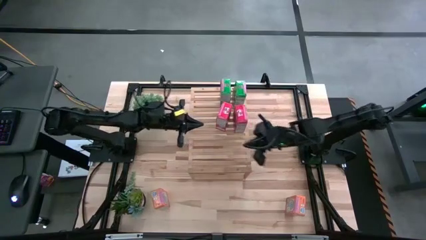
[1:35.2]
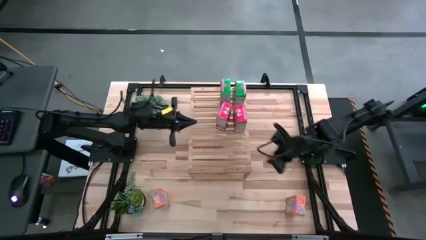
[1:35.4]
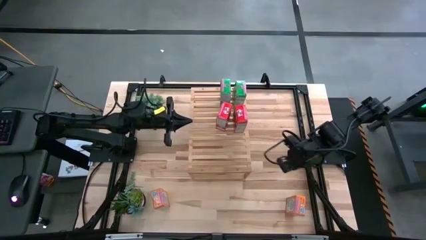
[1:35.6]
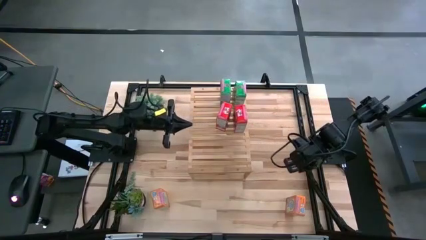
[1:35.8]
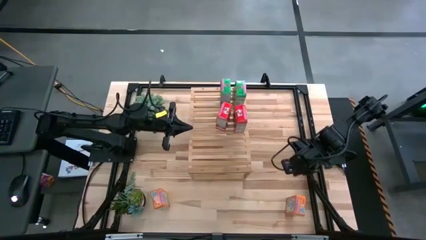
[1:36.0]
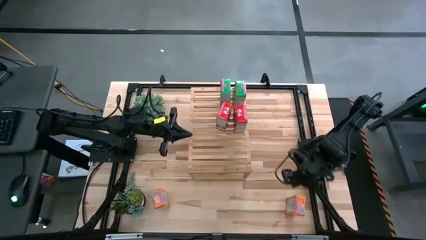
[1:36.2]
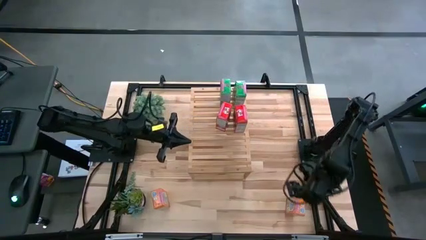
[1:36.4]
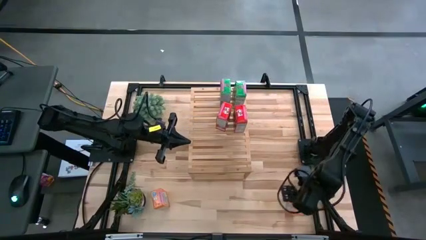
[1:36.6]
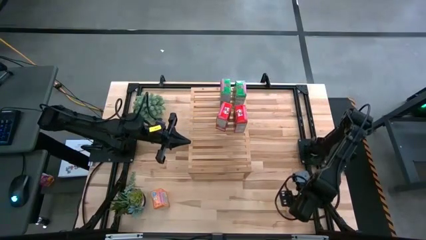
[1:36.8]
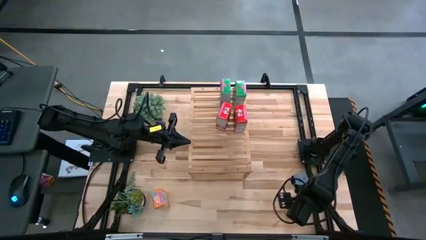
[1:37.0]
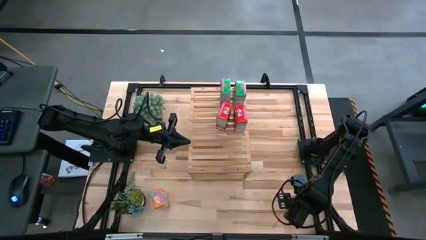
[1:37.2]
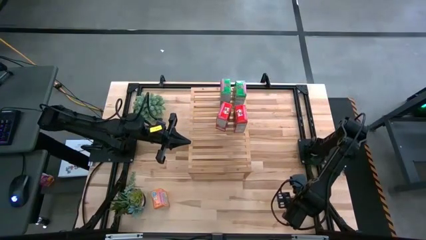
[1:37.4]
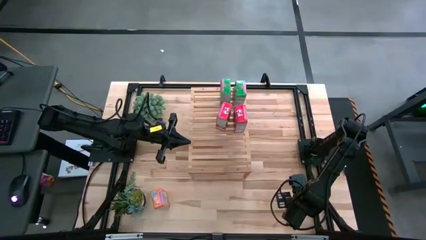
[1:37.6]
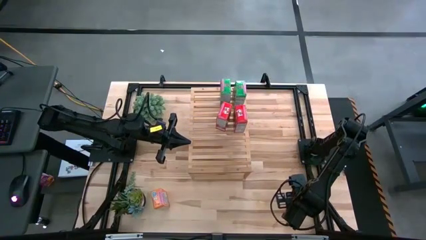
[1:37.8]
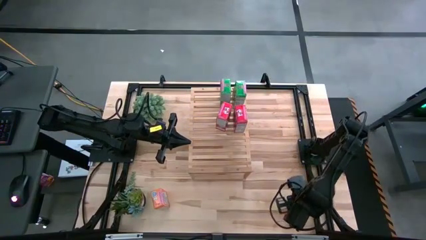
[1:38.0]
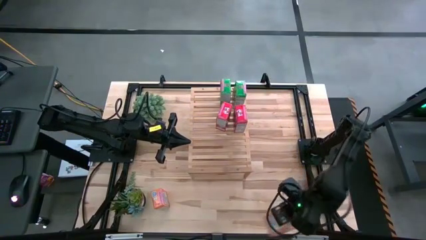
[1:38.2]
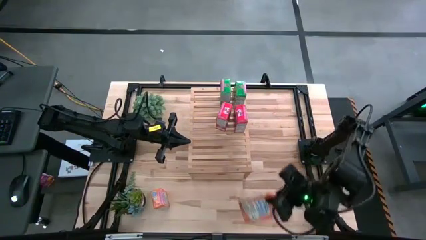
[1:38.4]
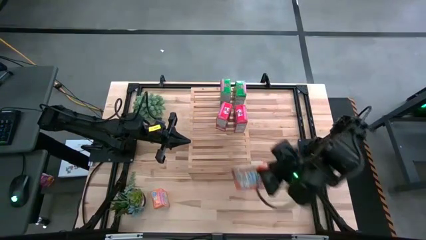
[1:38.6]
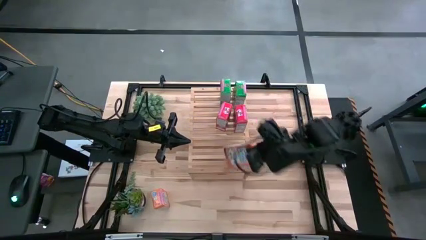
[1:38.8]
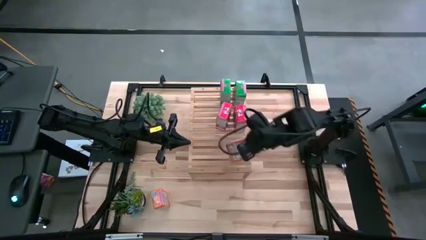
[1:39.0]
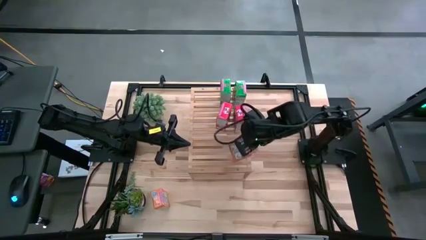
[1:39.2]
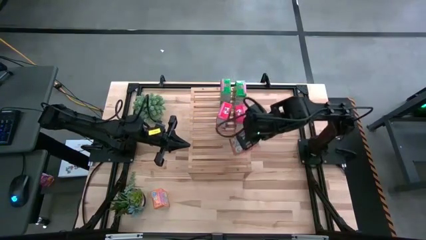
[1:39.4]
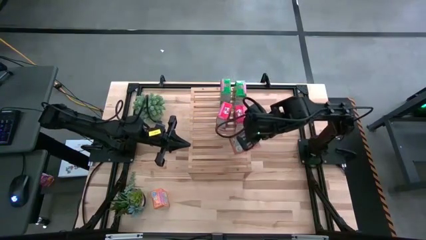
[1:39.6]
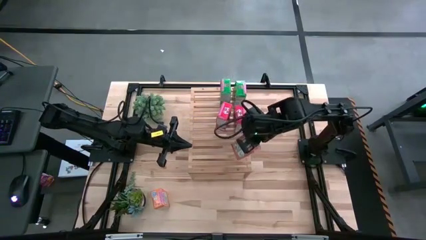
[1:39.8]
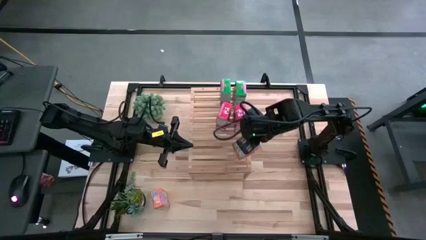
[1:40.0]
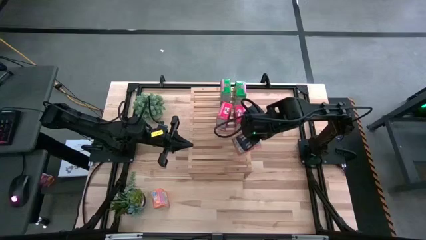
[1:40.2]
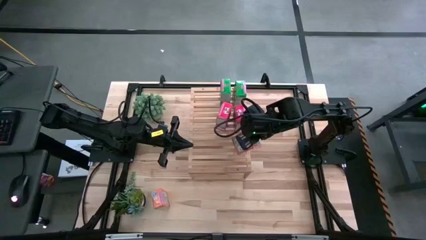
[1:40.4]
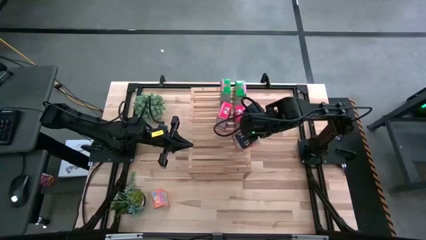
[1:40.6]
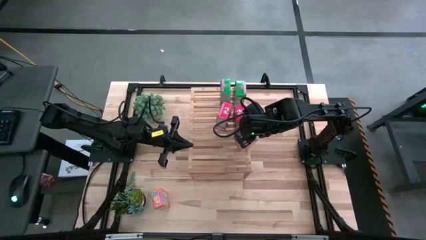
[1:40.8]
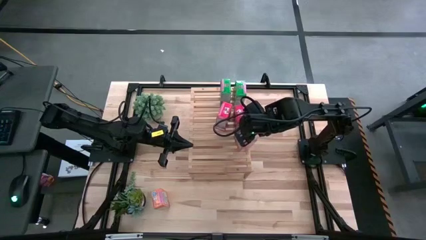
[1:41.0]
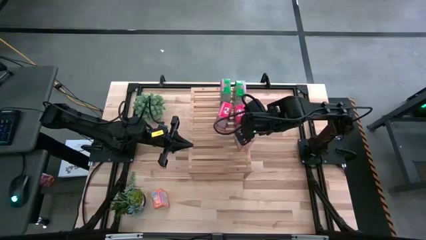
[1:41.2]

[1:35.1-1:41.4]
Task: Stack cereal on shelf
Put the right orange cereal box on the shelf

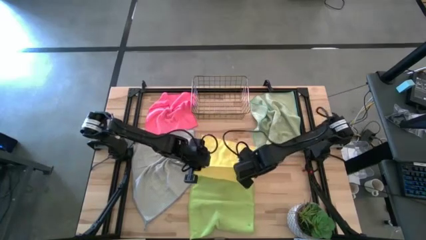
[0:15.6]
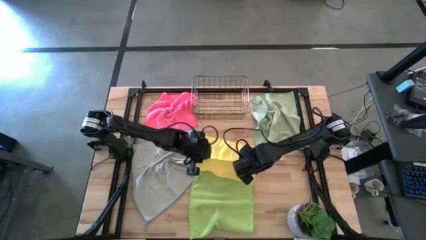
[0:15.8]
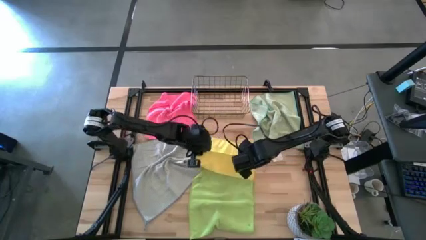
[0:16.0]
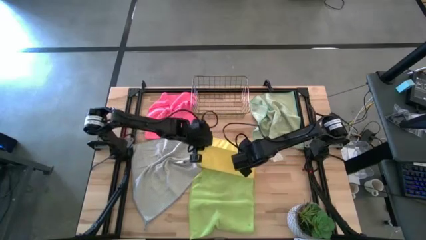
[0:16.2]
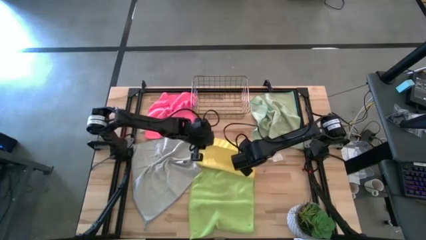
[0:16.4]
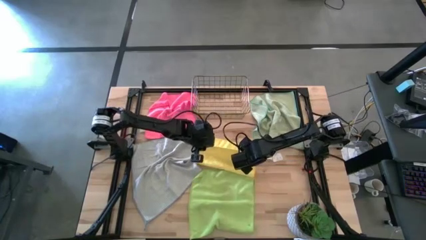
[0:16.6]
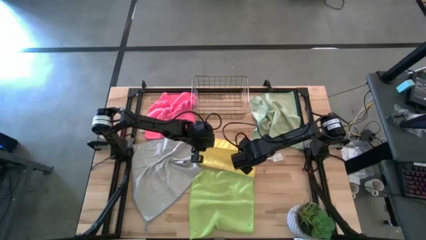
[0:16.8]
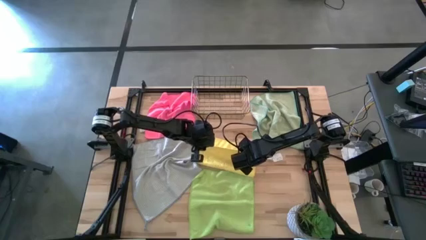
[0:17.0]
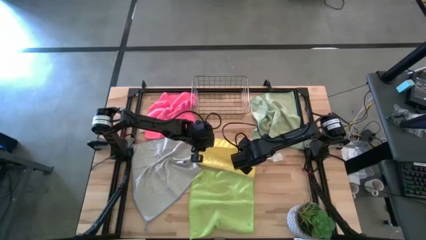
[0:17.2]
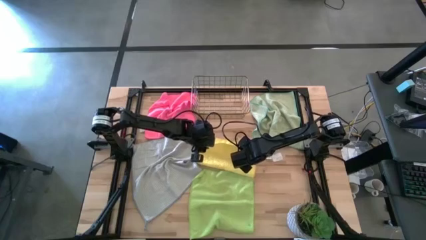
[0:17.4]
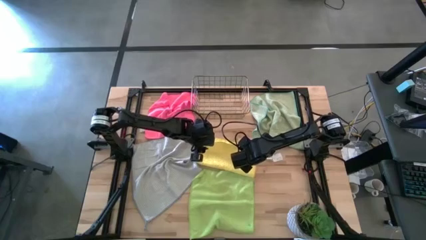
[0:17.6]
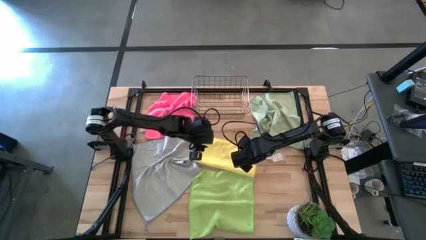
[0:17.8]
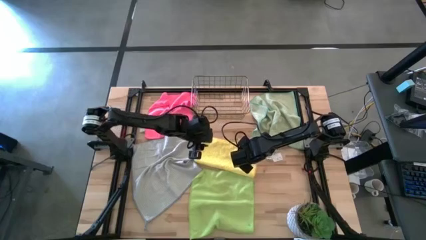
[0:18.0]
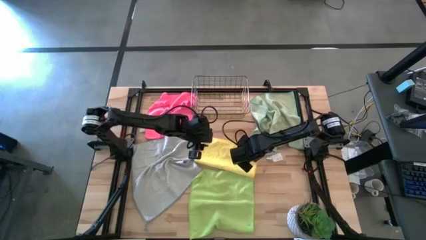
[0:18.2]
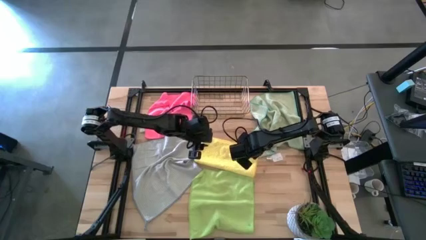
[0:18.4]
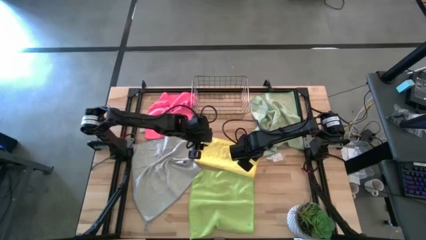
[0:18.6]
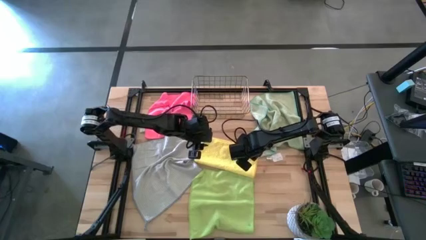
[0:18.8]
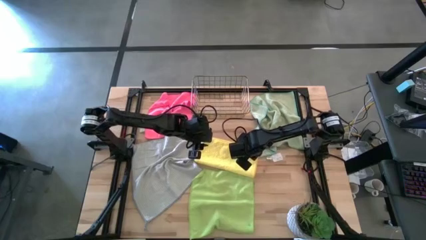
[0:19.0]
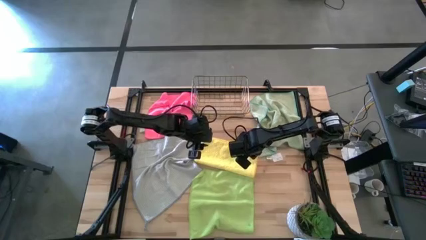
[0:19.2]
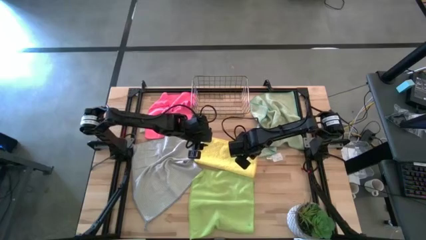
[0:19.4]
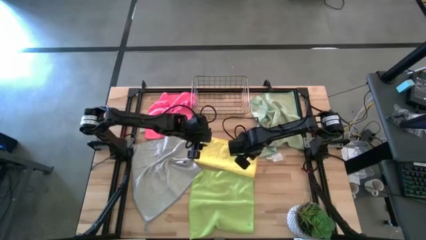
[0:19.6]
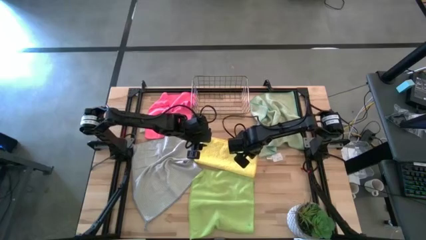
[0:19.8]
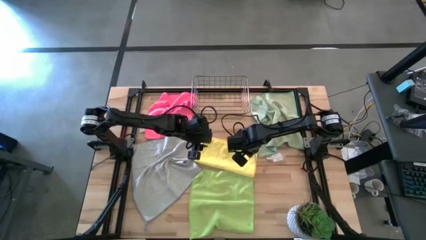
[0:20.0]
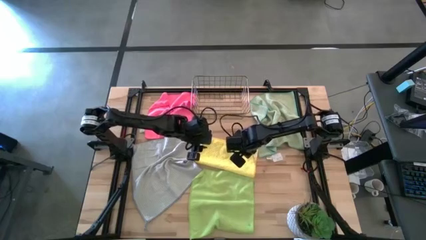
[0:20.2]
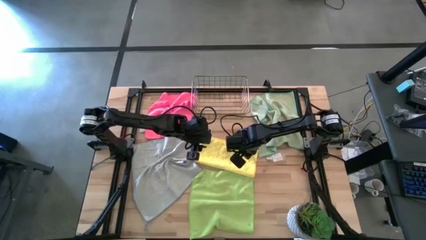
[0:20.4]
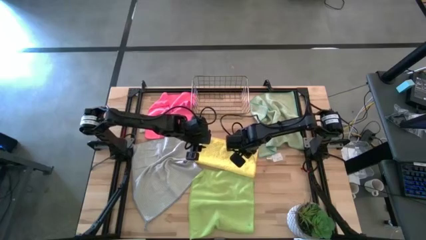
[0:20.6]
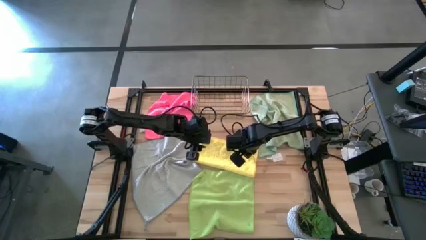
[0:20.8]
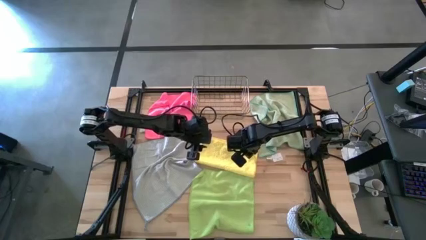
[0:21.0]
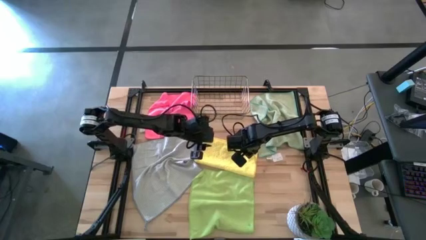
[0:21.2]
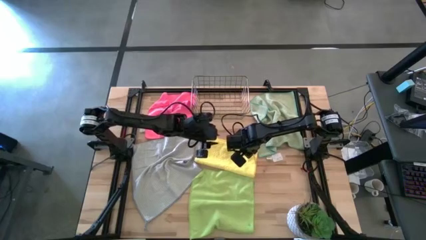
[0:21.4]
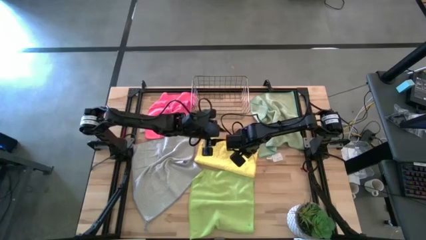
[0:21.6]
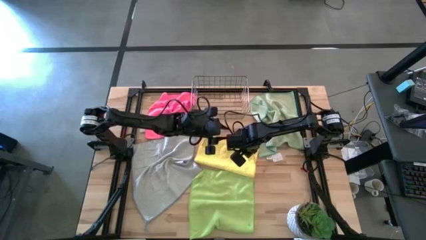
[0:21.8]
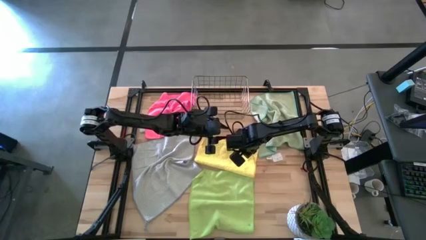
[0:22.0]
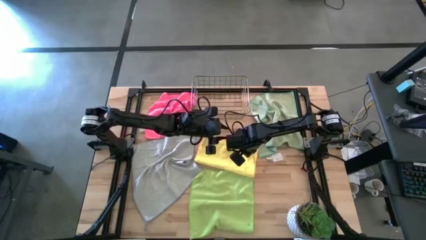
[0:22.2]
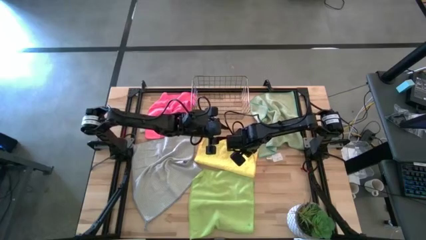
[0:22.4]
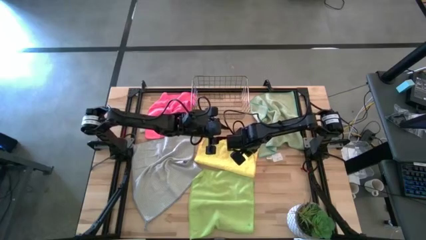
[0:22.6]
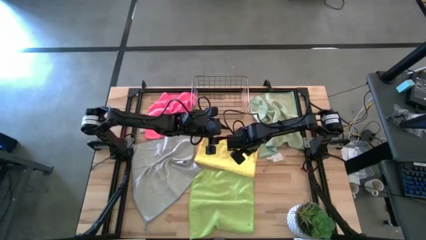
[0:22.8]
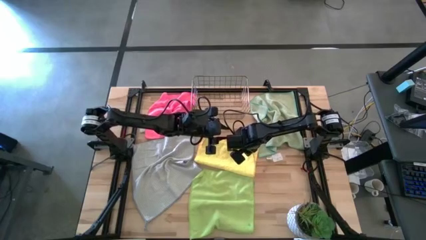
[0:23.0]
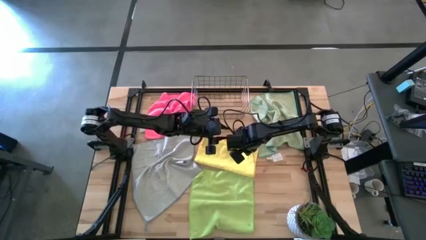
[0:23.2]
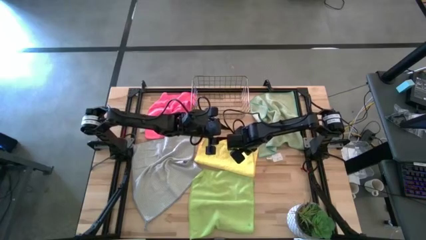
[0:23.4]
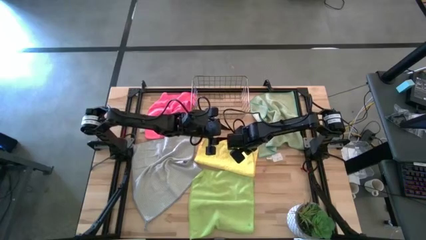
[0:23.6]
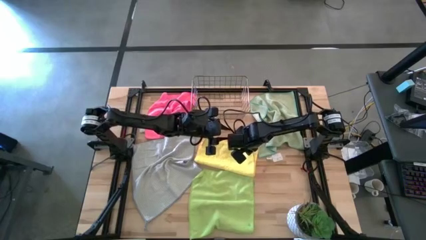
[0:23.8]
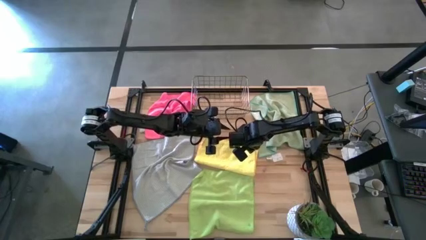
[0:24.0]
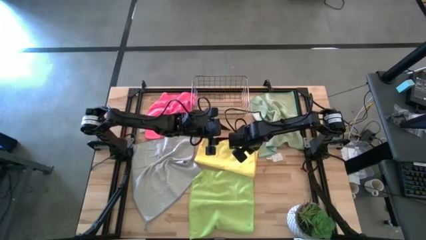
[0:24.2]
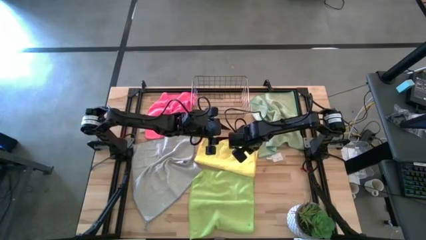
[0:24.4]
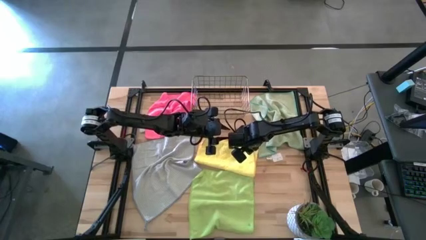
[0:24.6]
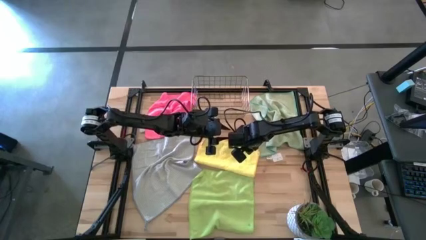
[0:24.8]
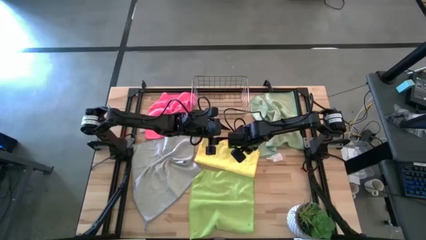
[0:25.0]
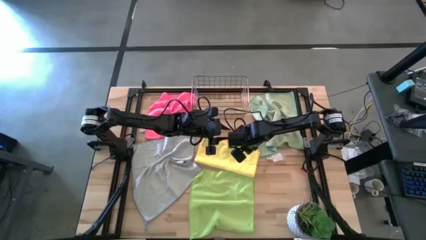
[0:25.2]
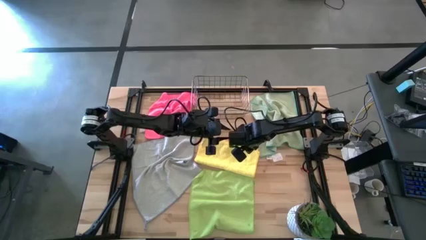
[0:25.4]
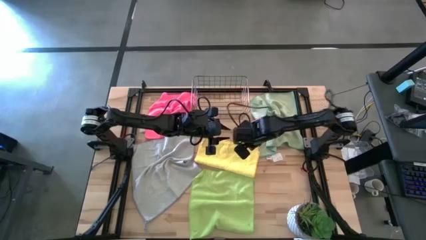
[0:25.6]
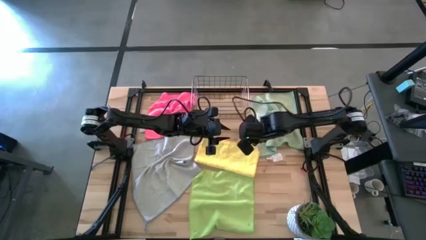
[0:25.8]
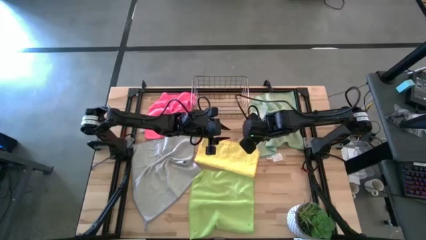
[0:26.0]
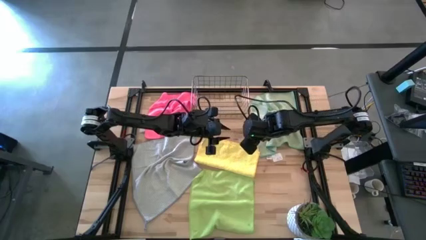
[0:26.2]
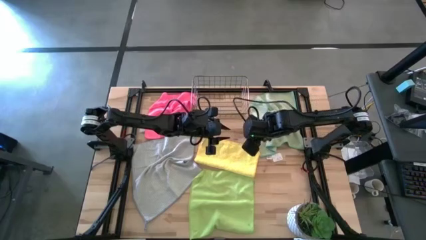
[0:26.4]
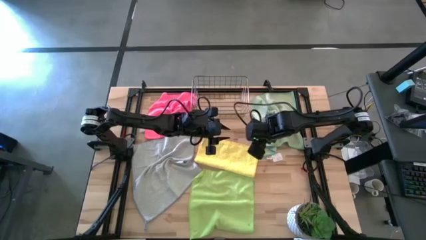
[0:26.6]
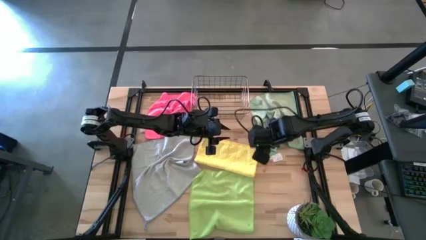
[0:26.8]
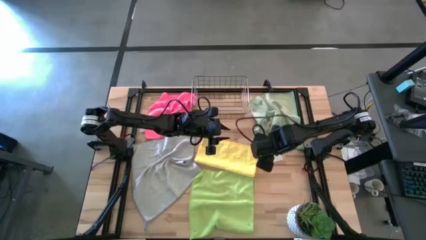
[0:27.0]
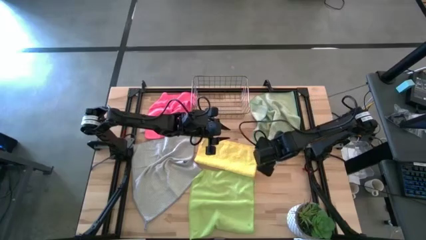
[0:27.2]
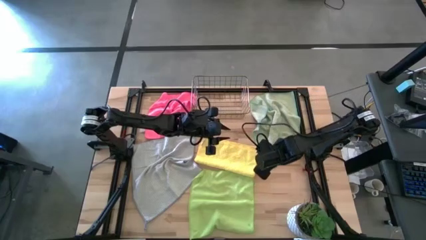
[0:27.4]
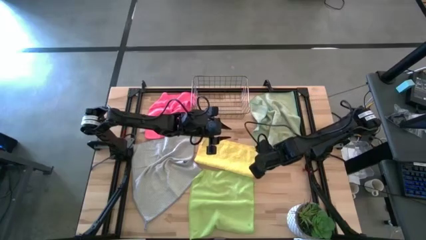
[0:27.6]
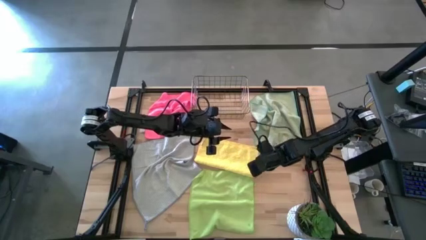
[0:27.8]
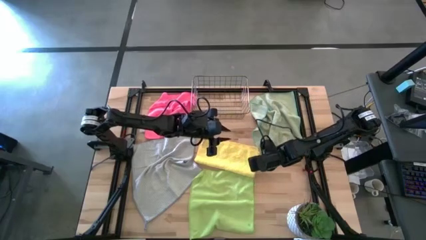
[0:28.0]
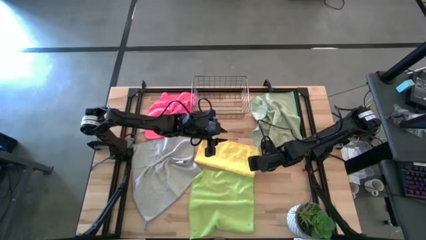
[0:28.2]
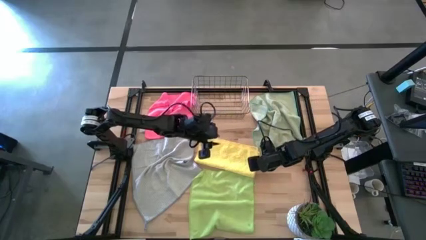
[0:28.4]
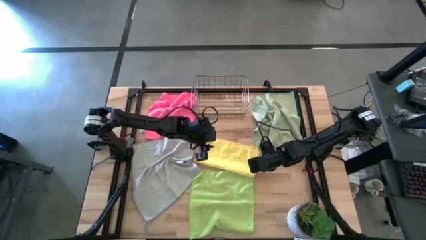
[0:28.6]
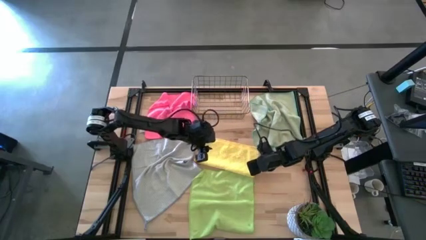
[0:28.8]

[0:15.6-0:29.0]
Task: Fold microfiber towels
Fold the yellow towel
